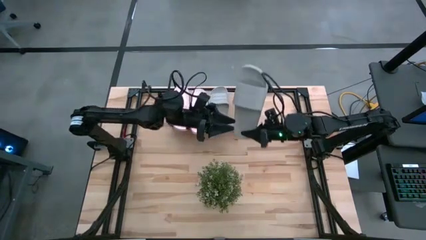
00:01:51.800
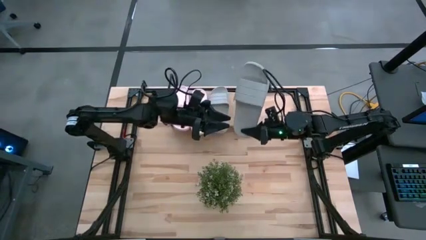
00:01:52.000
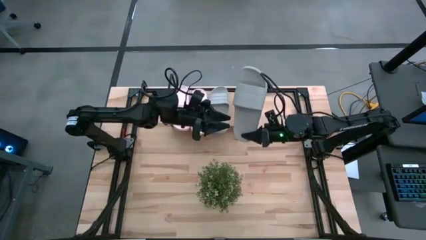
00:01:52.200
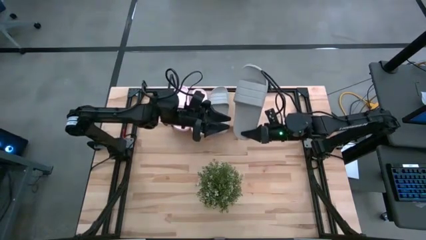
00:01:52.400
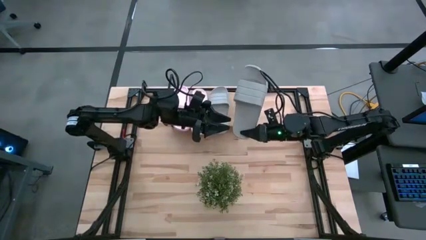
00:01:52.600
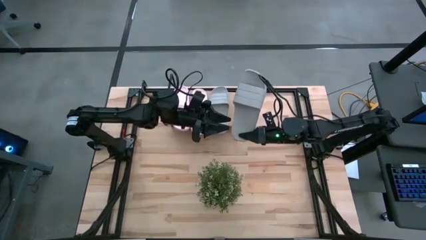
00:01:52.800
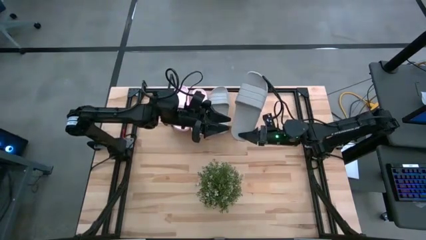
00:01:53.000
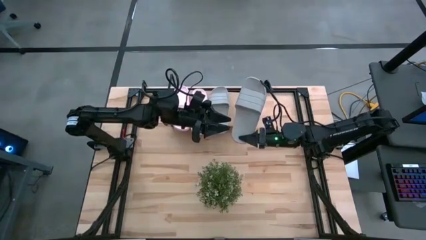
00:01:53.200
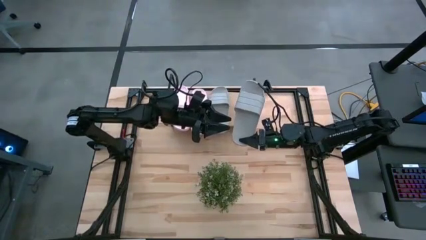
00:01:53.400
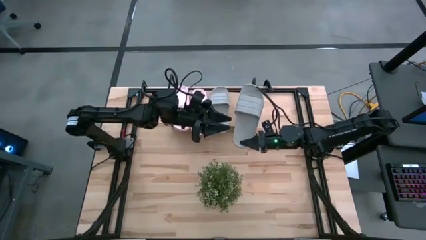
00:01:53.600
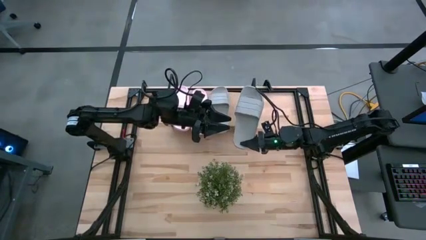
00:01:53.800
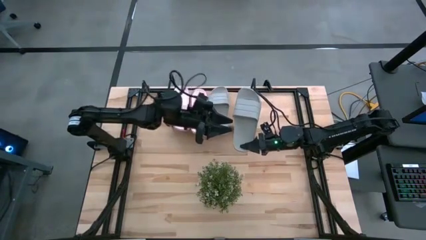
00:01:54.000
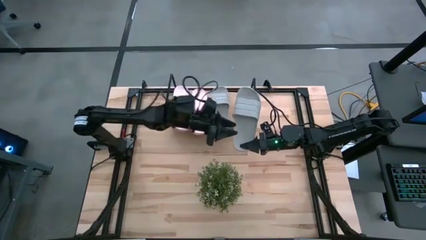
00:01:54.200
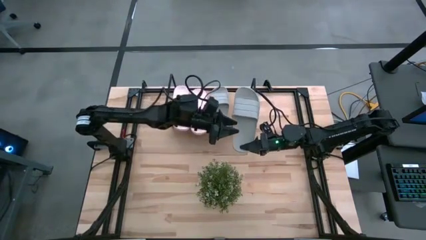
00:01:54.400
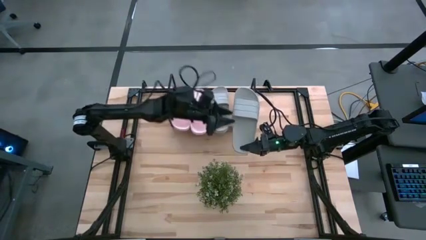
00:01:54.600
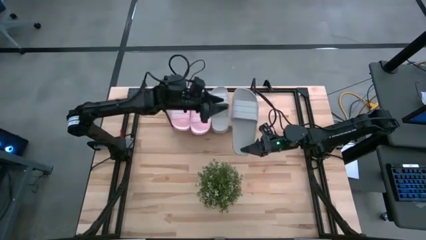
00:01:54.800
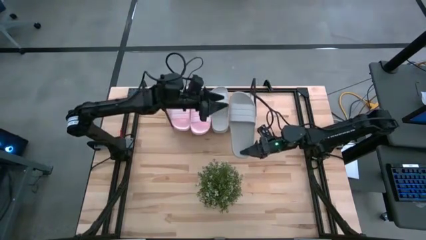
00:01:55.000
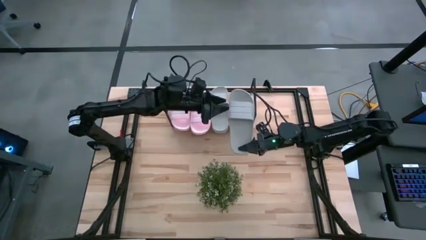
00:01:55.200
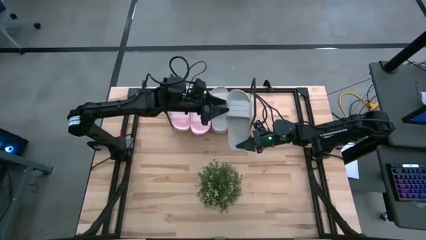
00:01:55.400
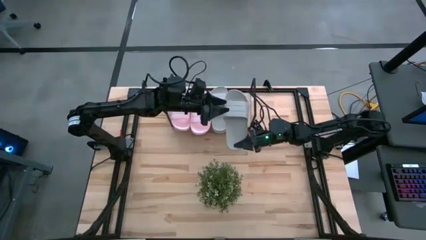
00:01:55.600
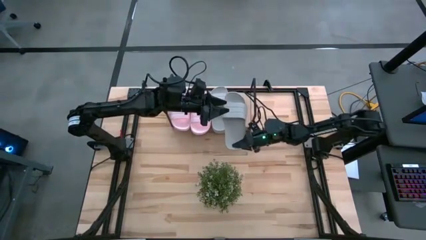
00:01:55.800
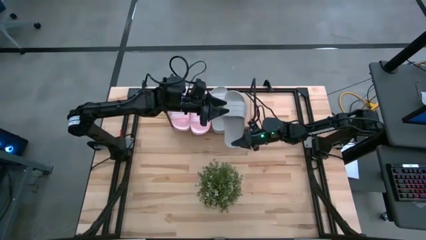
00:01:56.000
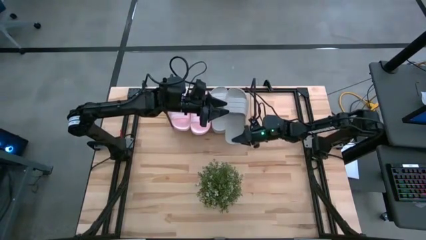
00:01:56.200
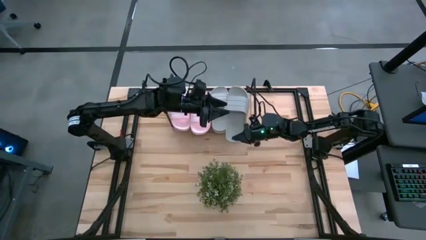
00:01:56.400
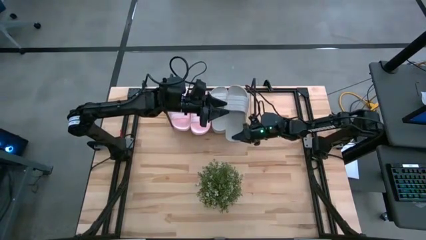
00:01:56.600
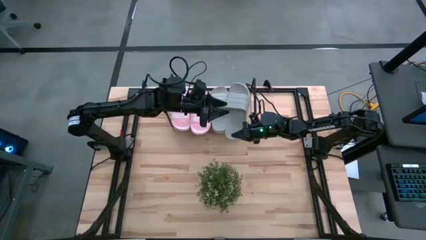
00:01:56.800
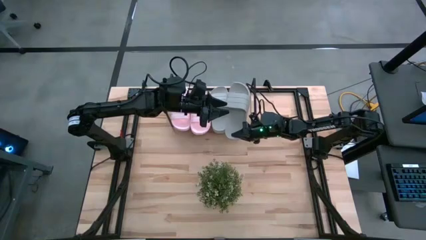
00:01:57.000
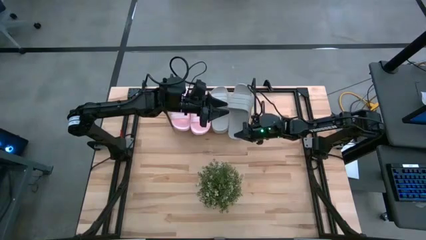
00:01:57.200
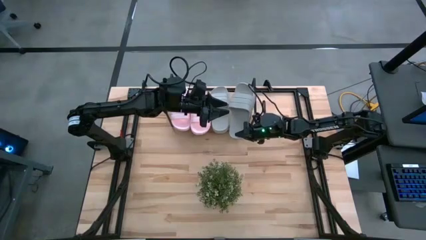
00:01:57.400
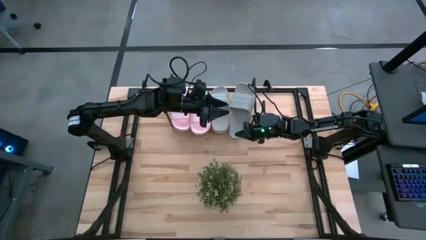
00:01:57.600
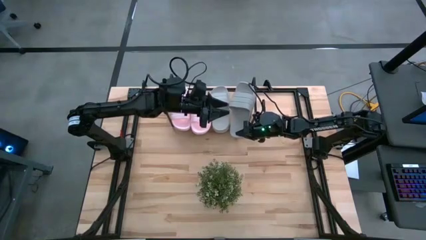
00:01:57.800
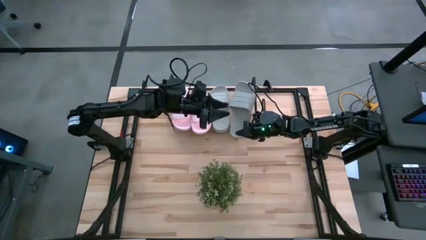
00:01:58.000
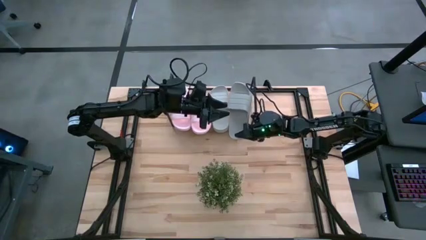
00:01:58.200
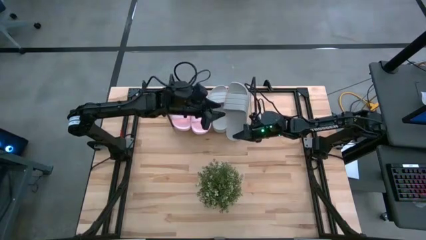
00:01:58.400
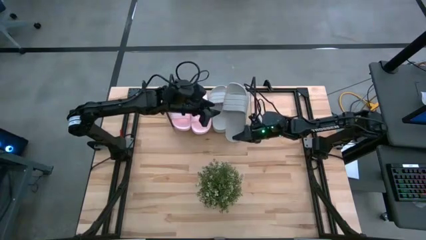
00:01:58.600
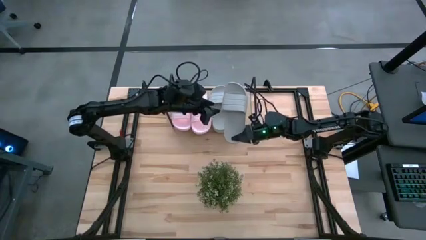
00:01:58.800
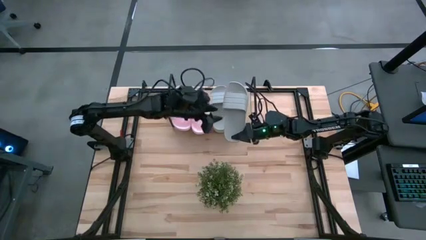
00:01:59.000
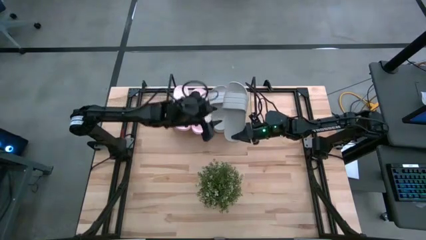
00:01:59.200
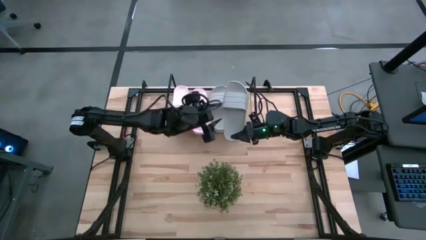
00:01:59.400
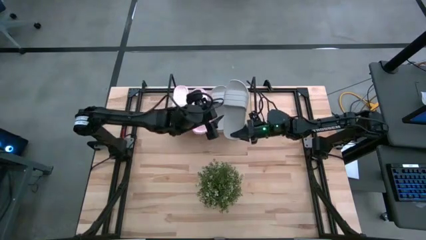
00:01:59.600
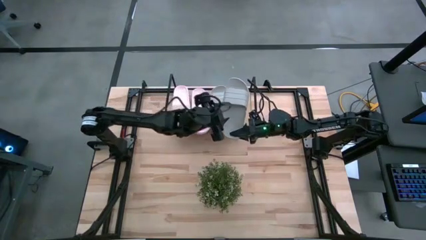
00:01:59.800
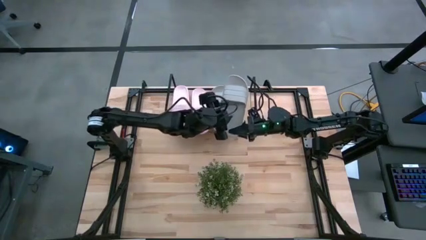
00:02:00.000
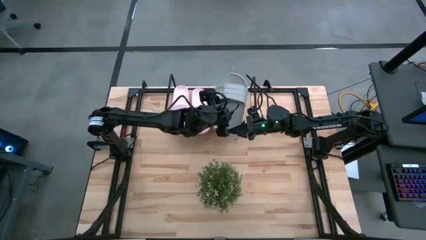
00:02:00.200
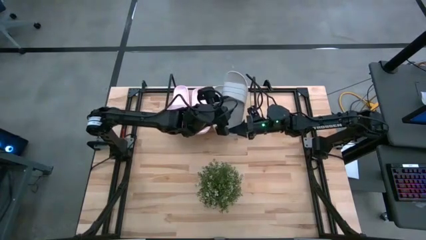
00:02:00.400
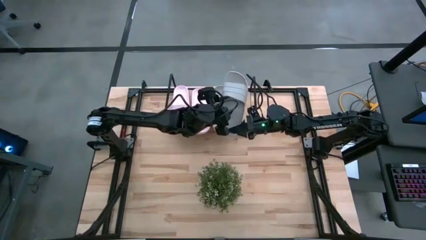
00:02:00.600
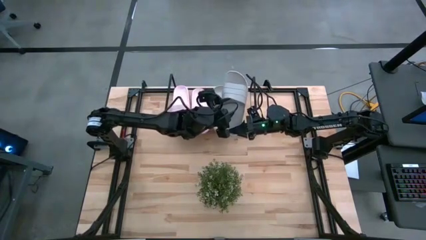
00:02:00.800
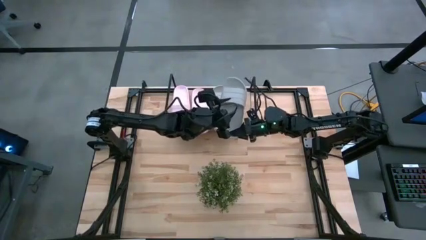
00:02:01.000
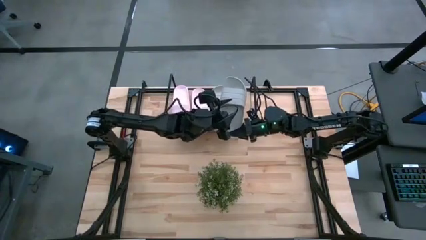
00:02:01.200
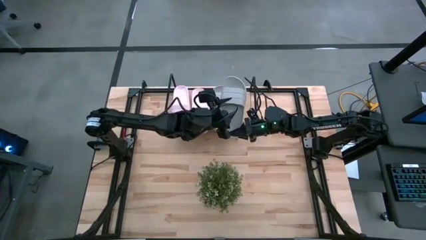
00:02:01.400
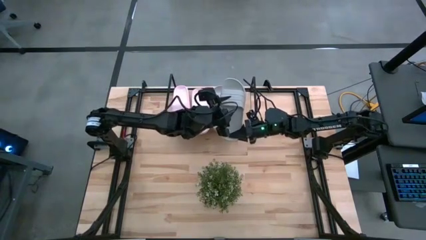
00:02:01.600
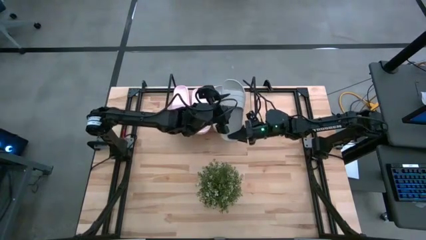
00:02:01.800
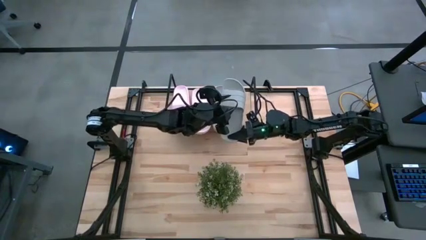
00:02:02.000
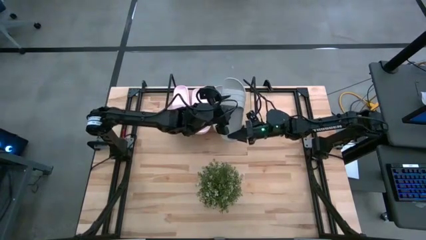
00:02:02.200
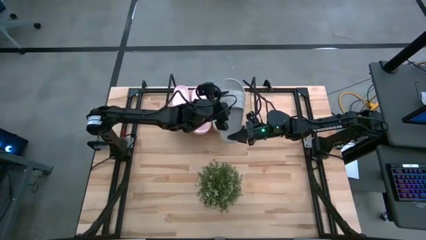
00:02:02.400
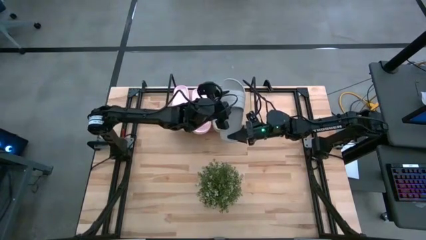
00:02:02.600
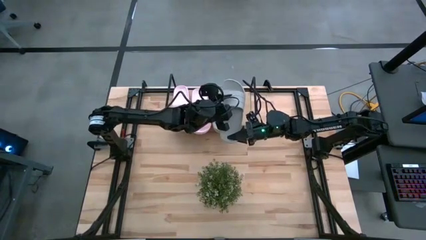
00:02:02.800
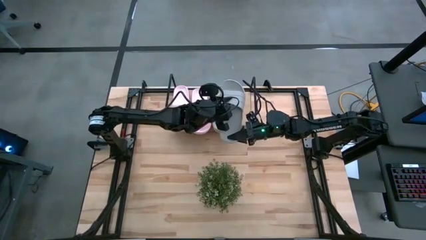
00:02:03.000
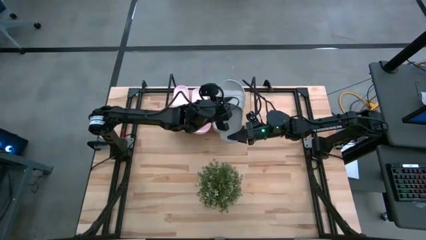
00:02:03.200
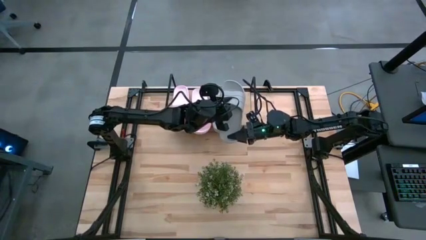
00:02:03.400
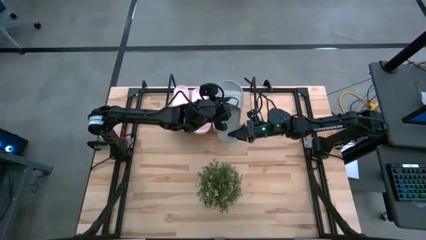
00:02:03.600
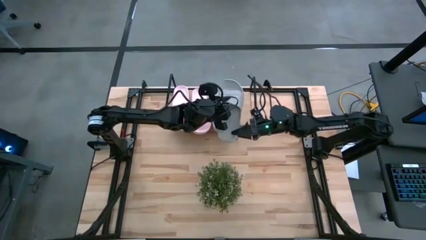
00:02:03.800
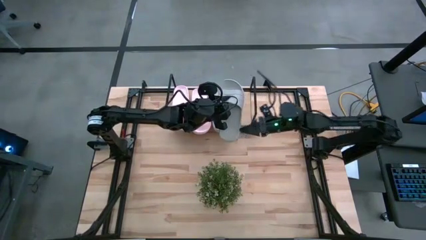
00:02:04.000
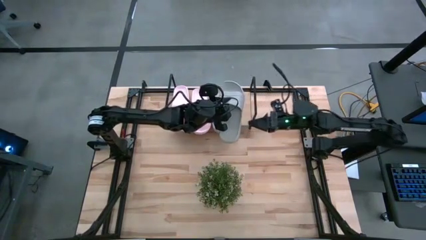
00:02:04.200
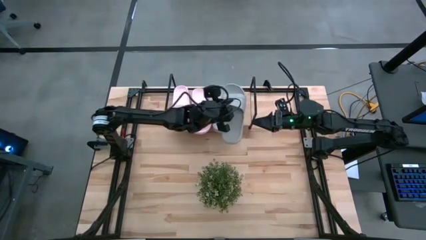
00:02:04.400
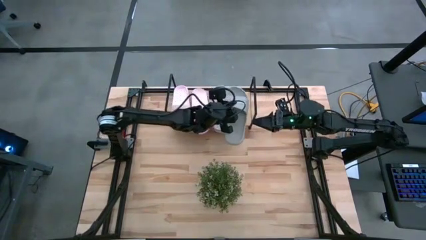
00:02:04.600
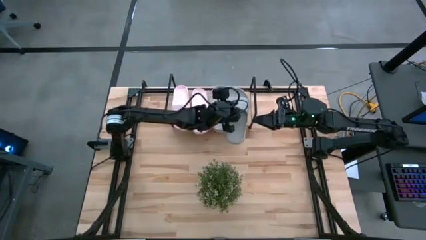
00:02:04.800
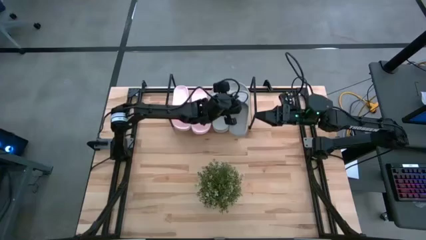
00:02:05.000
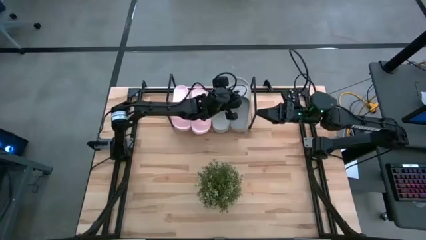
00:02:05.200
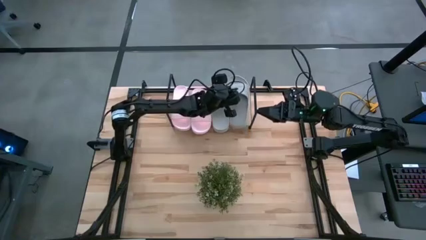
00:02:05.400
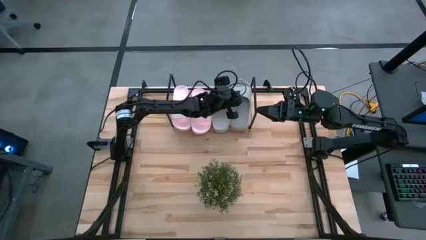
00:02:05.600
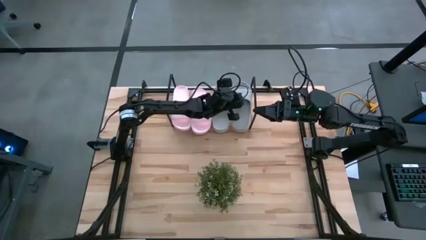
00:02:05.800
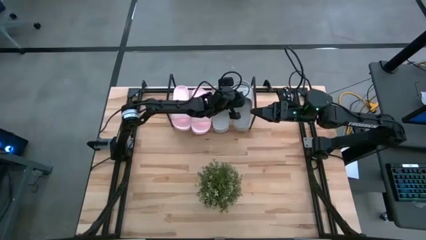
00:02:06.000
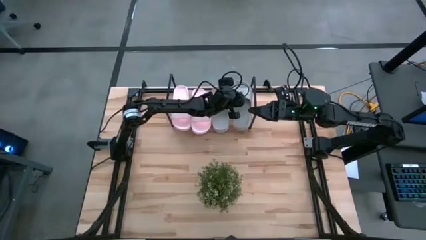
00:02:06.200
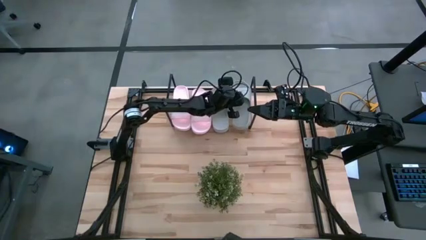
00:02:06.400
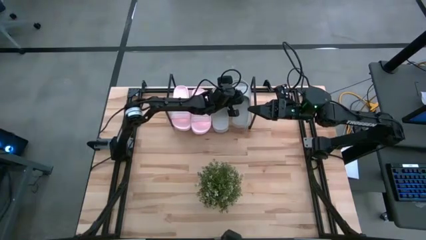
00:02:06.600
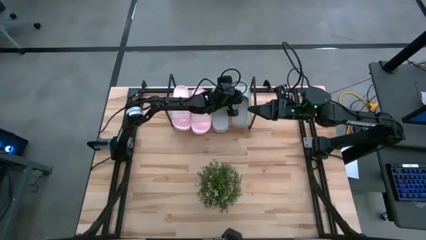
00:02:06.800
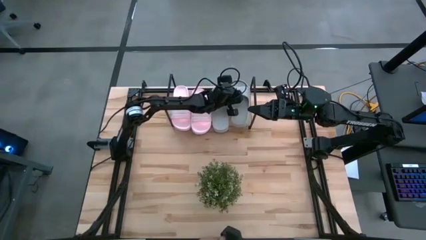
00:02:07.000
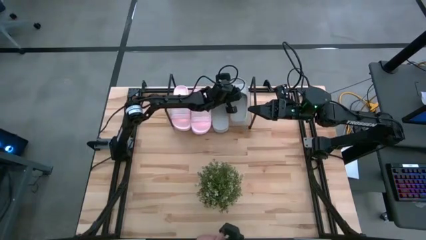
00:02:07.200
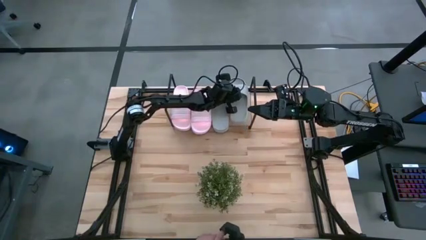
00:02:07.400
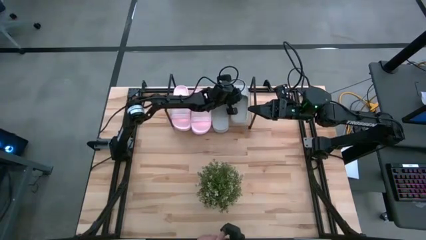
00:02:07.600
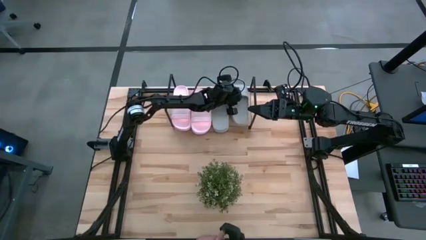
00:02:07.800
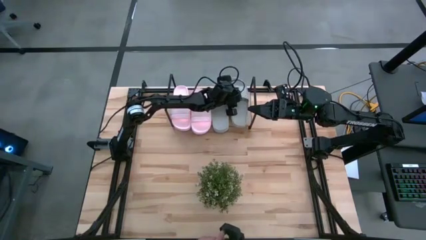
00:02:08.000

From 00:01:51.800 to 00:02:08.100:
Task: Pick and place slides into the shelf
Put the gray slide on the shelf
